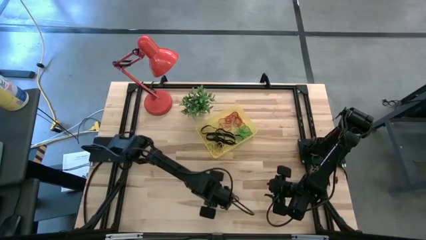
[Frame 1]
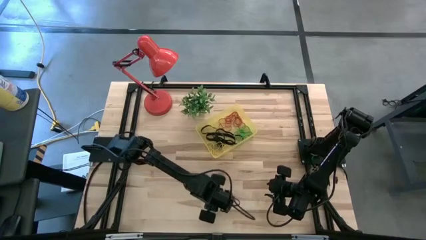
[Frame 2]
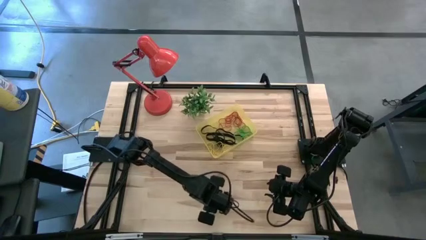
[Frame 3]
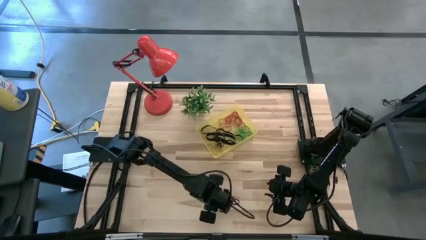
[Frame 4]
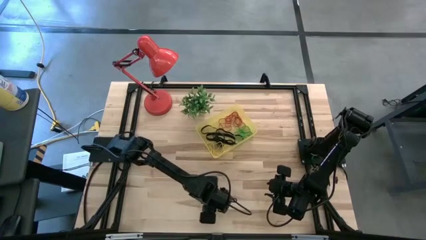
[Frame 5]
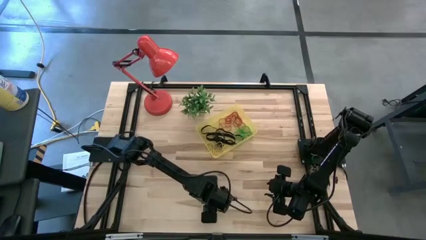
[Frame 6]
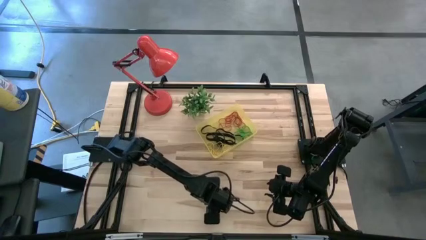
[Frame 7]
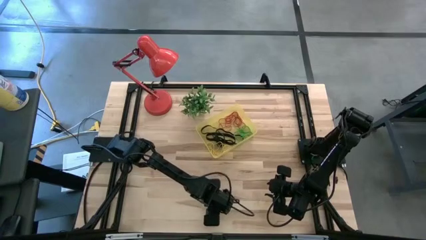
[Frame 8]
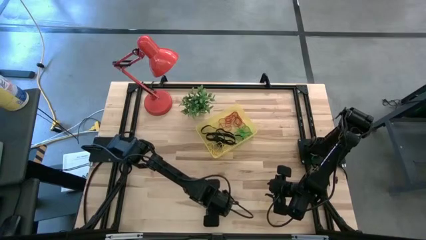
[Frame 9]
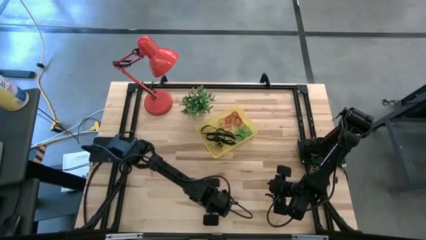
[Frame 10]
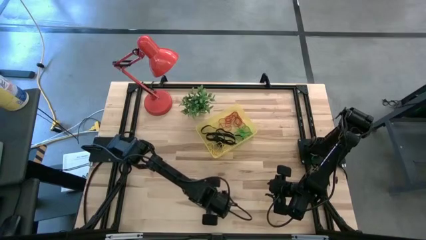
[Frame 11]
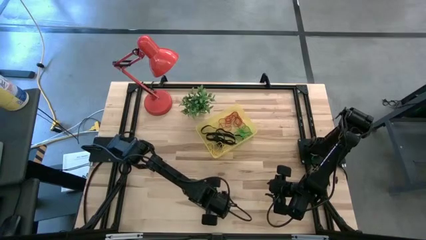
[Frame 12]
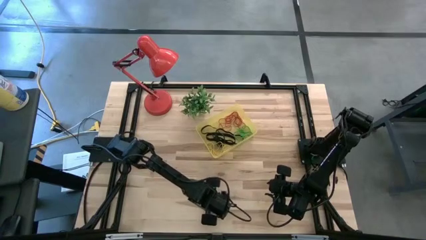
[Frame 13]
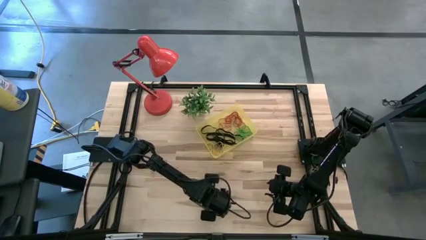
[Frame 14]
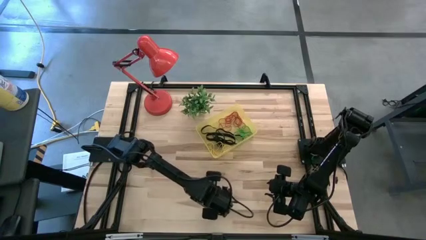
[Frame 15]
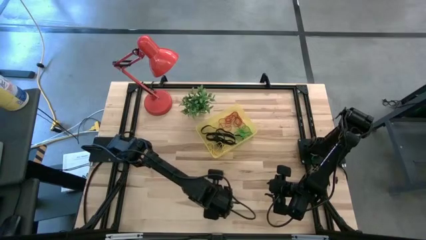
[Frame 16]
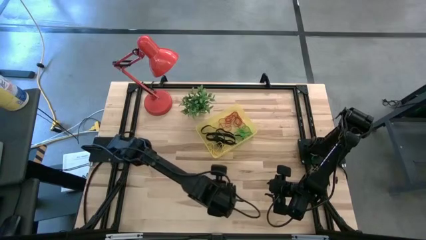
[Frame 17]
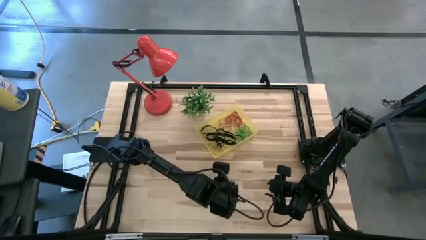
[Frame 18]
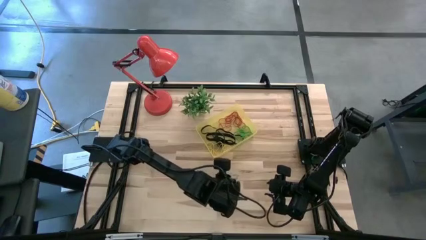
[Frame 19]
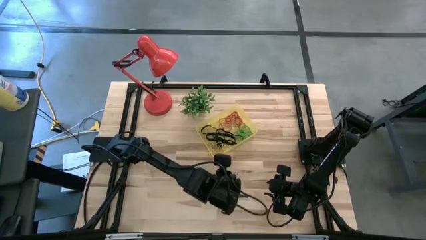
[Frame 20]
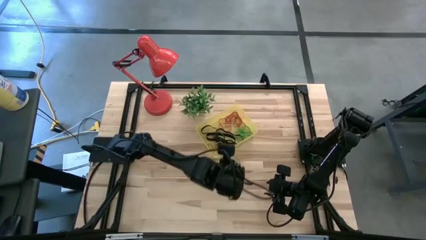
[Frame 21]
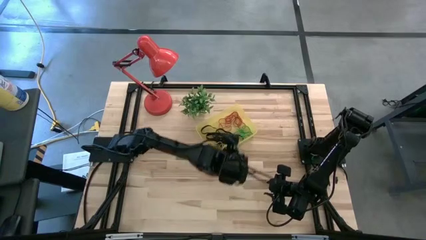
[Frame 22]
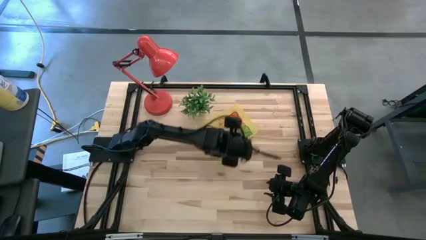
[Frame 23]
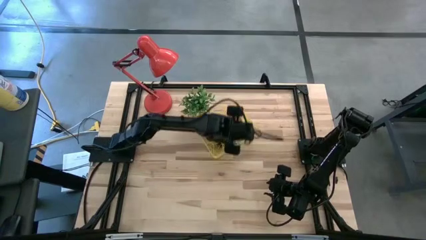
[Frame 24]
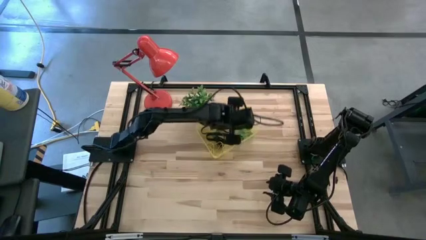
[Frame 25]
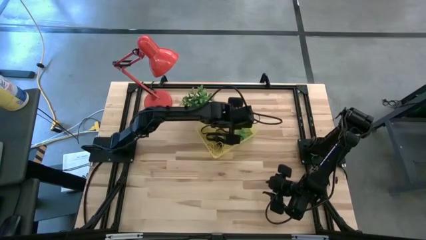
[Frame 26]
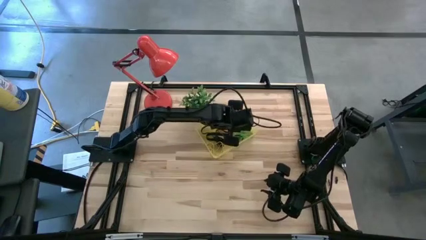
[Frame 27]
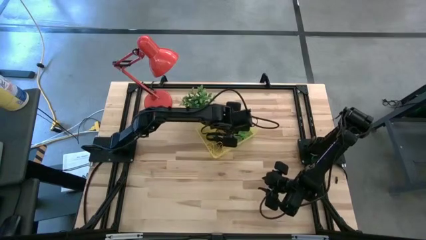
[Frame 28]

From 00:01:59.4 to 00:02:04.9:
Task: Pick and place rubber bands into bin
Put the blue rubber band into the transparent yellow bin

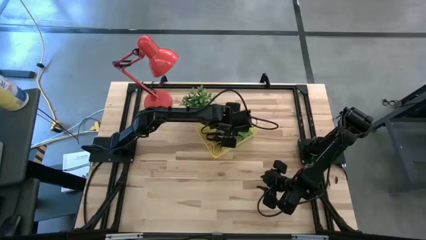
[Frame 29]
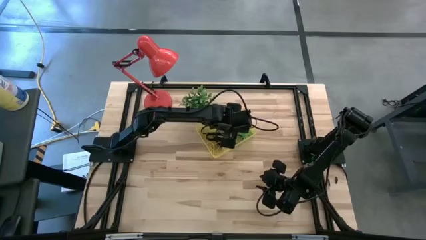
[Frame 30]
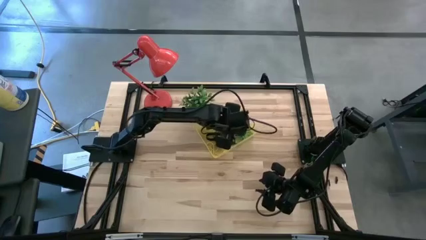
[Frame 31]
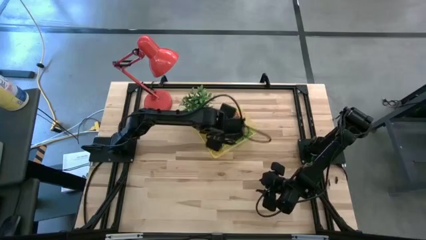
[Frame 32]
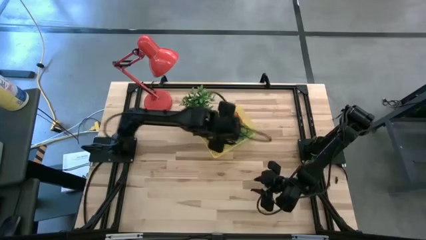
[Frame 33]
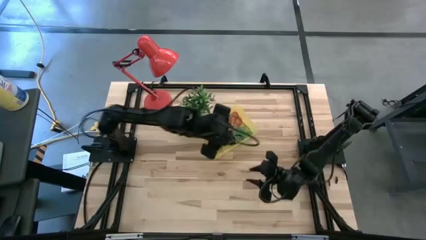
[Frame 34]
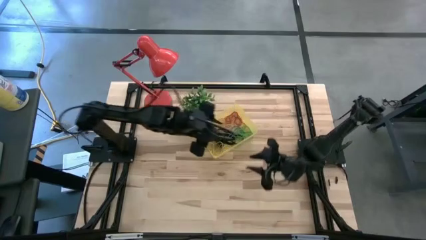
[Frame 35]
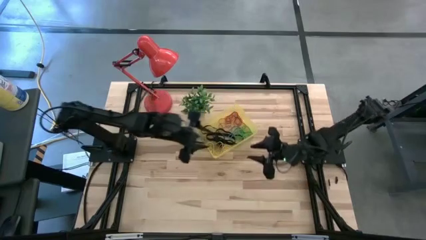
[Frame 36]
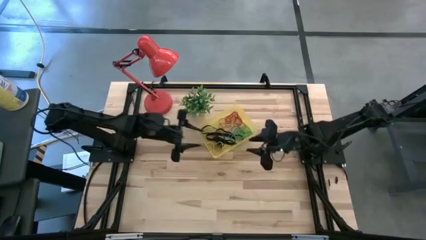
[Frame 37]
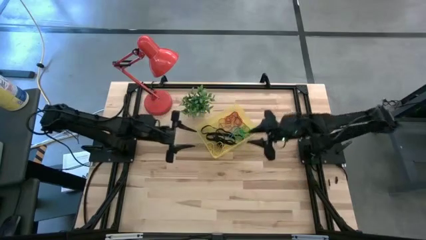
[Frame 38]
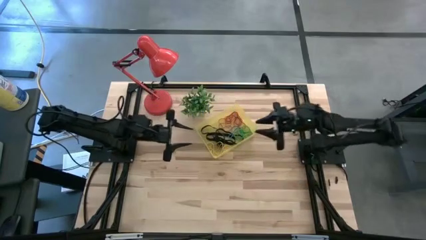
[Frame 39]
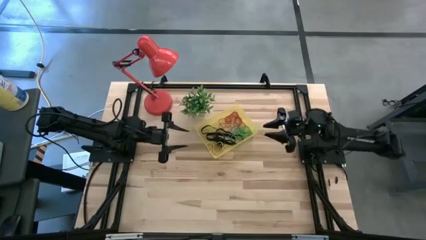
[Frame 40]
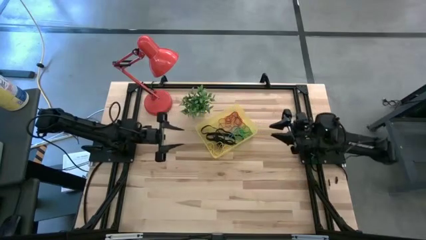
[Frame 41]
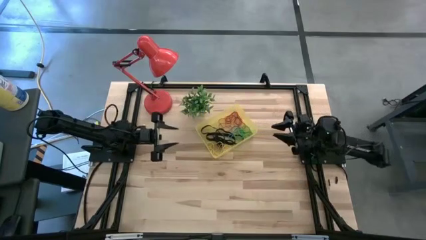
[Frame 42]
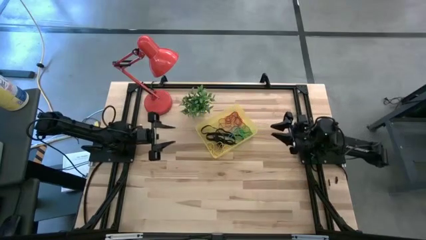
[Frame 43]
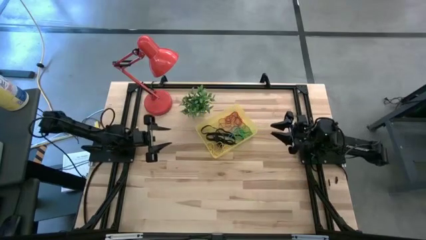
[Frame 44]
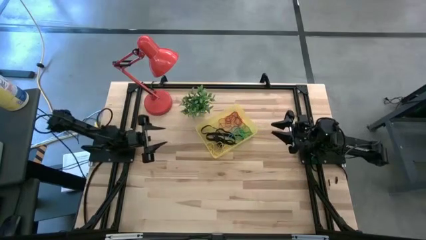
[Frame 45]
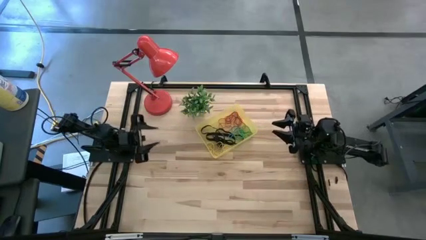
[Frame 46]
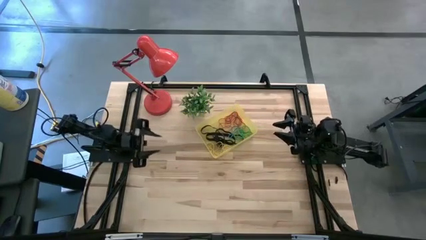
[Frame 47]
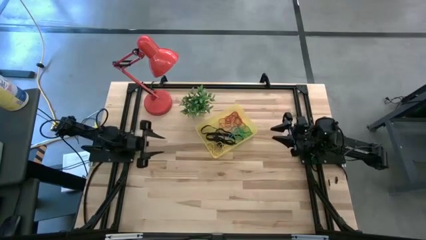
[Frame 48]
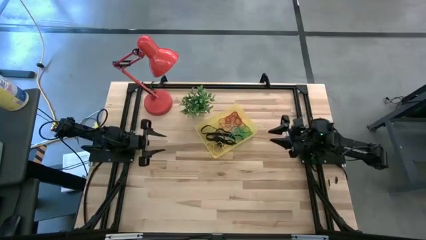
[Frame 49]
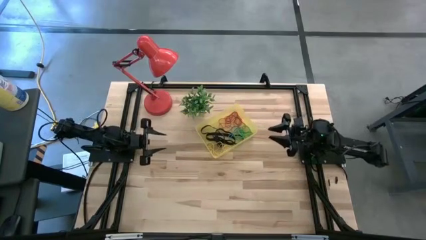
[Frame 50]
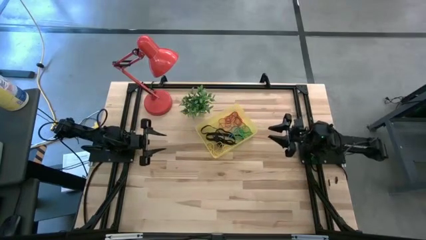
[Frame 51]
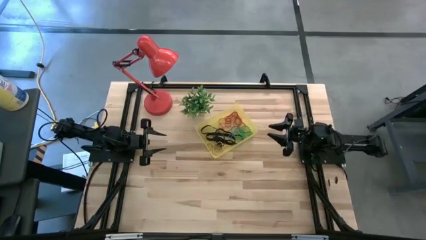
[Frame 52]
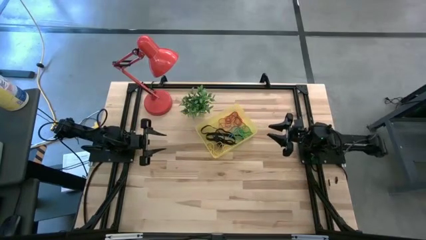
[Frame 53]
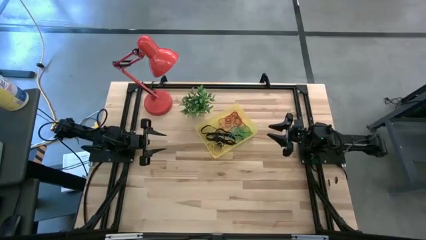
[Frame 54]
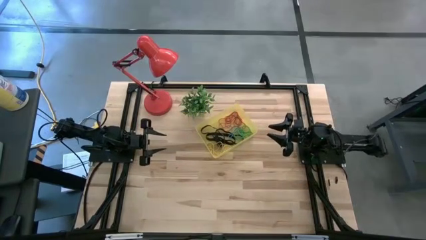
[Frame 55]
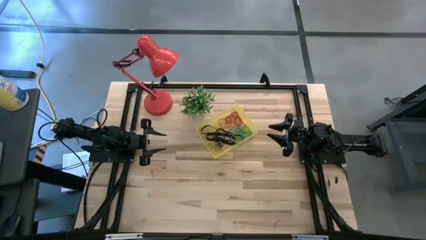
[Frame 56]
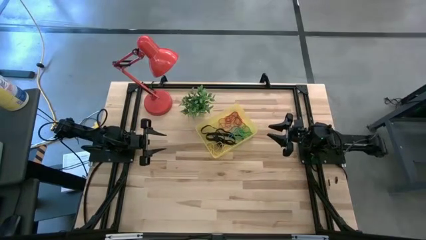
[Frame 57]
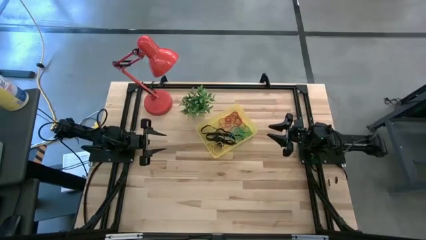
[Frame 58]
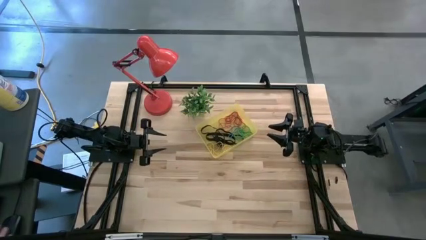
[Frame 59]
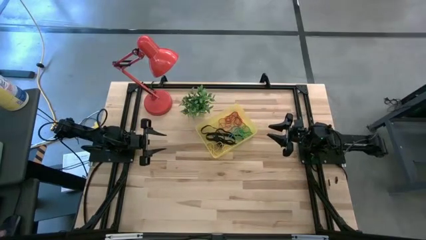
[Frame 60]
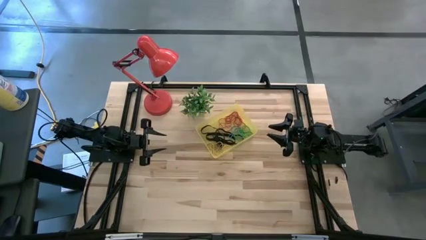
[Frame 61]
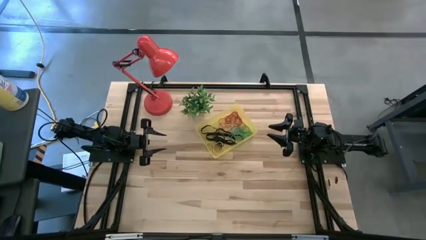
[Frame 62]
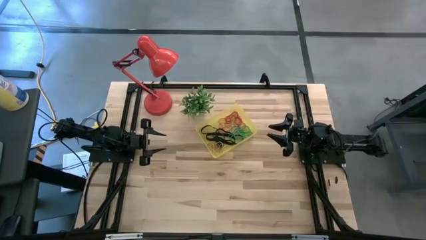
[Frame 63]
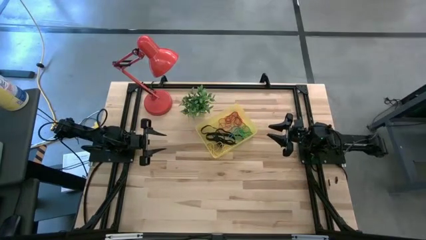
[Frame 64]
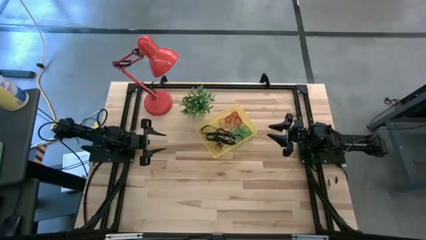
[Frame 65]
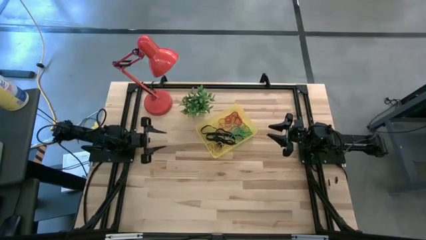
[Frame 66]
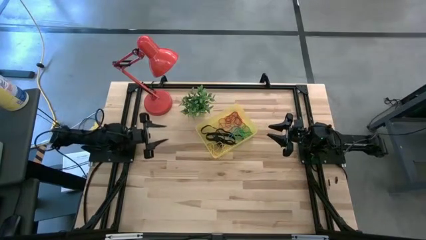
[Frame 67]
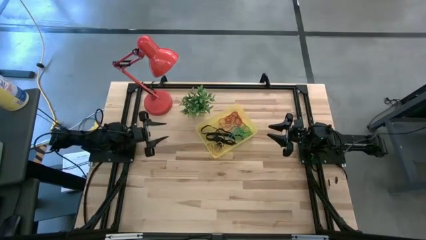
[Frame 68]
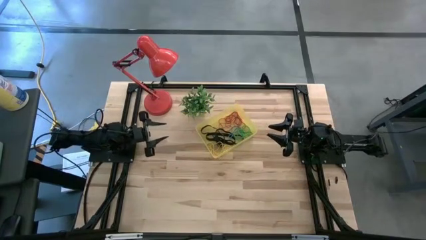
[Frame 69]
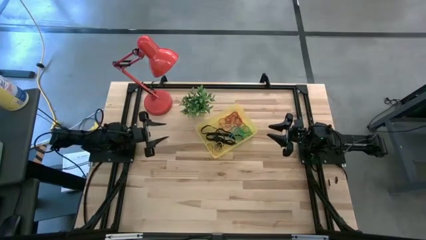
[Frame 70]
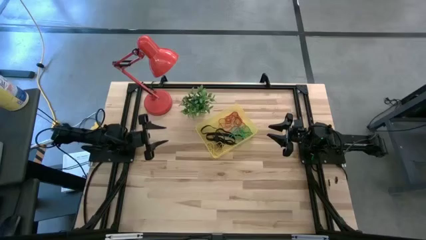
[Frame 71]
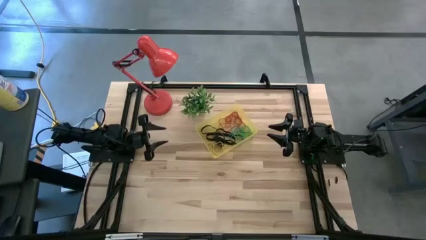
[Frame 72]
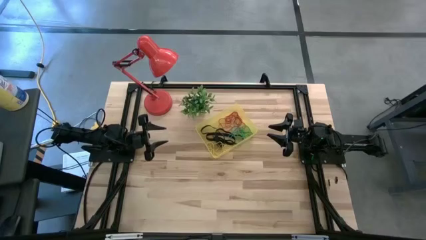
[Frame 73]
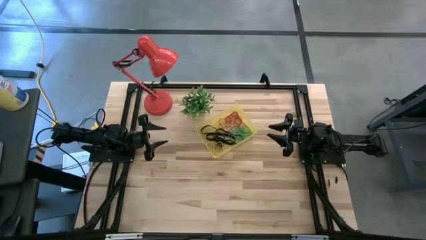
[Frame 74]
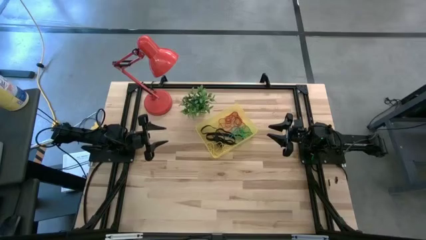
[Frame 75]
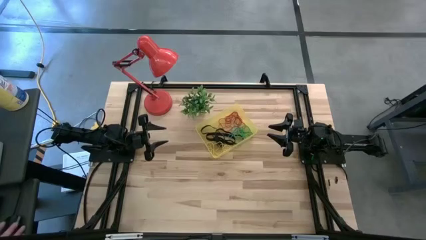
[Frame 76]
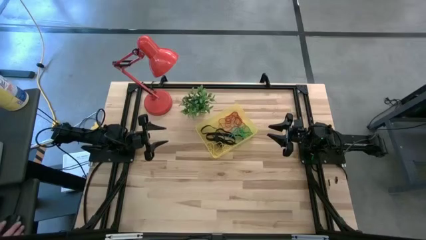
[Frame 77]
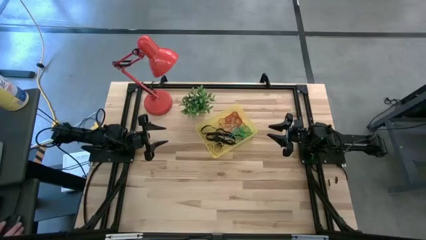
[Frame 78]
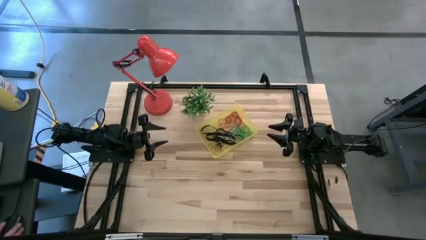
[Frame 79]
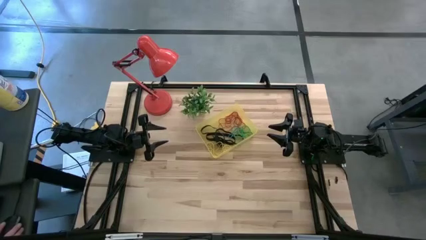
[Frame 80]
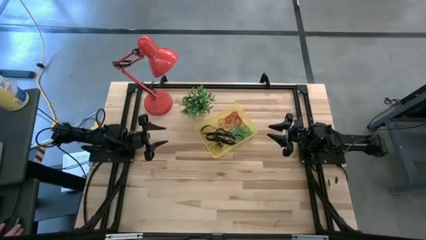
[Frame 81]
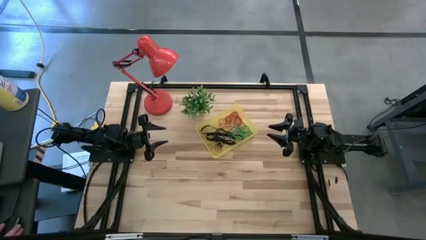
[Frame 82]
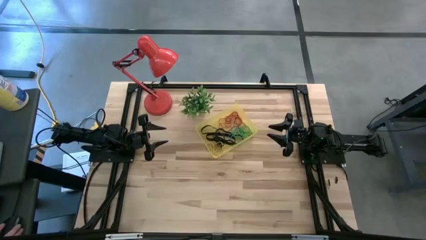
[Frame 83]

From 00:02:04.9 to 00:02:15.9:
Return to Home Position
